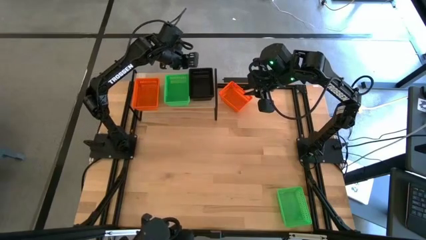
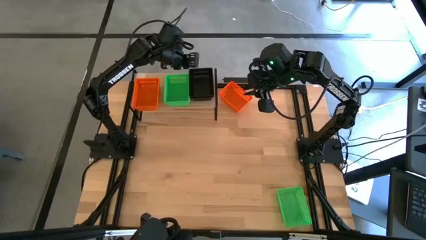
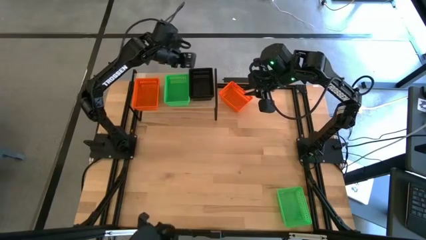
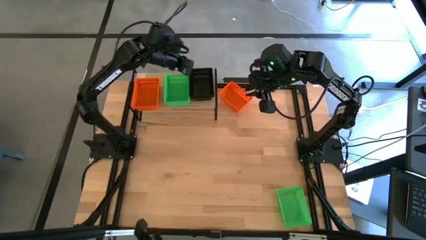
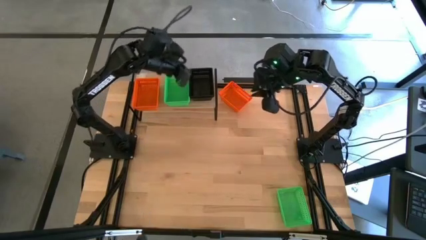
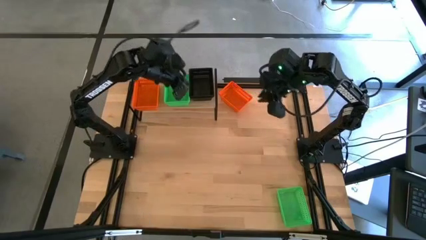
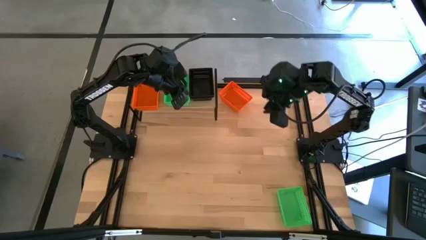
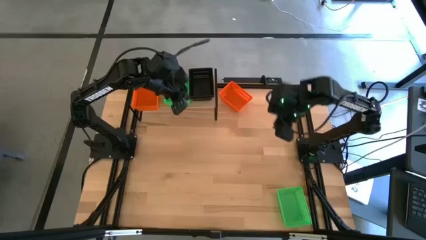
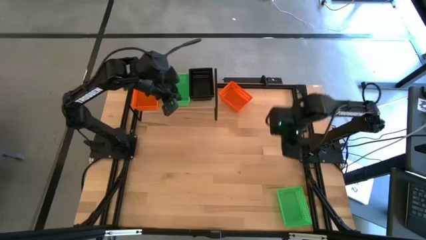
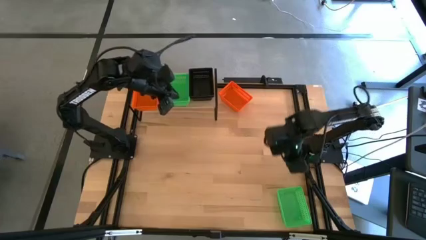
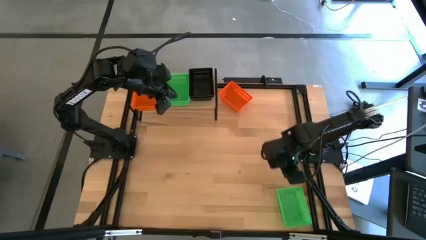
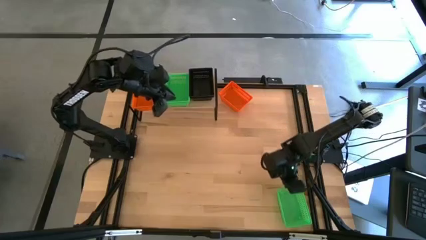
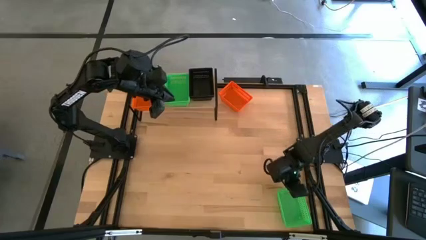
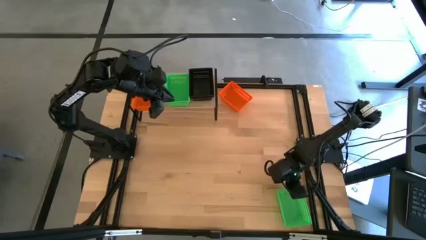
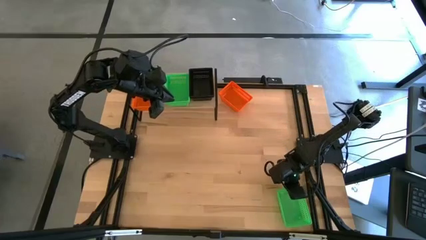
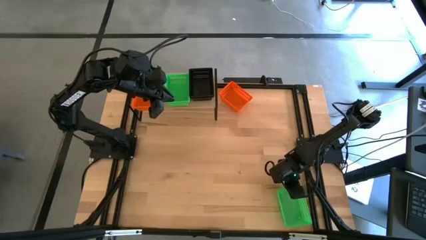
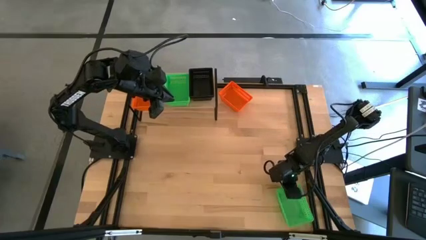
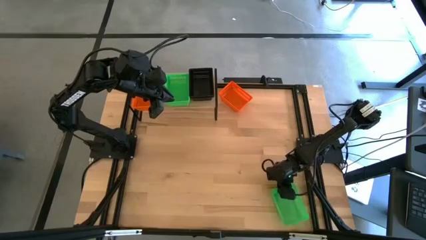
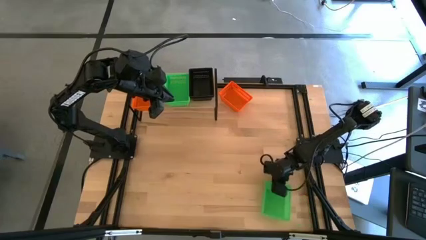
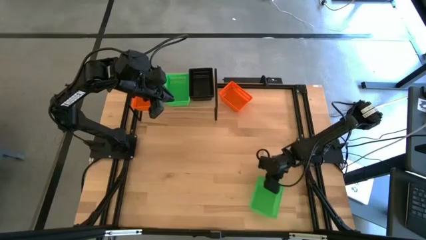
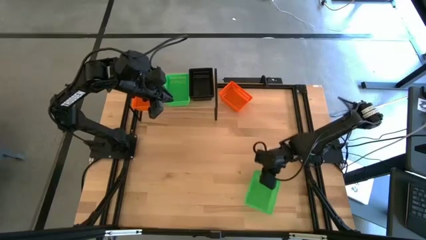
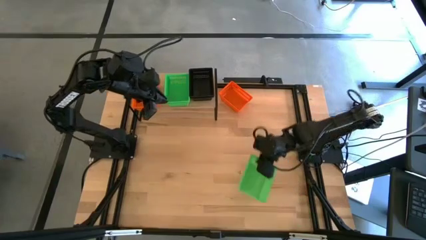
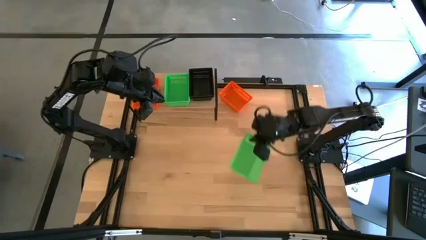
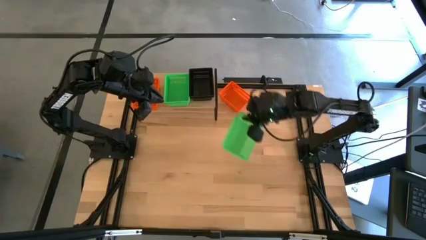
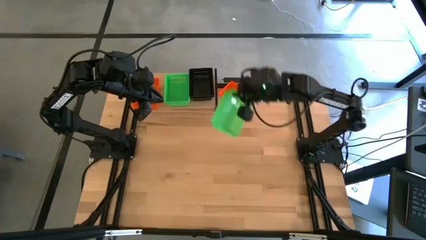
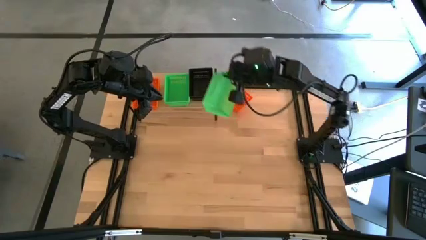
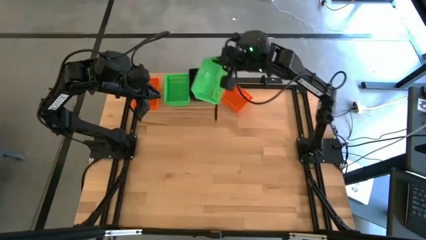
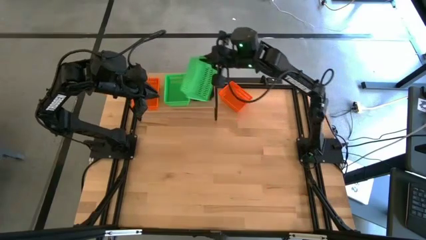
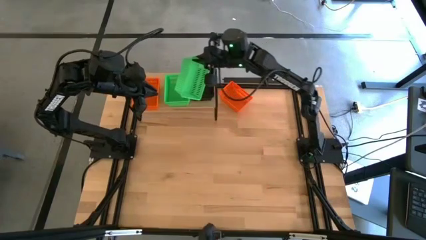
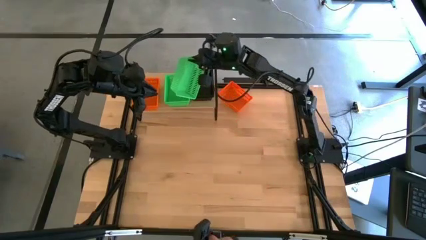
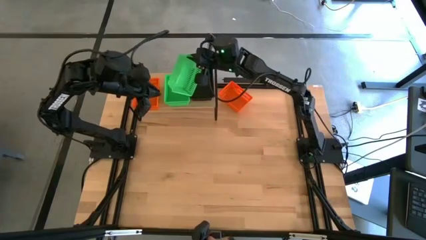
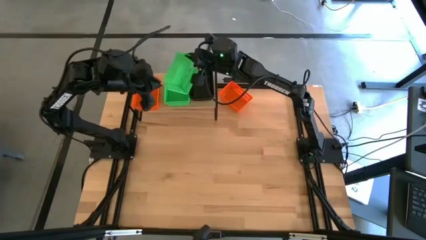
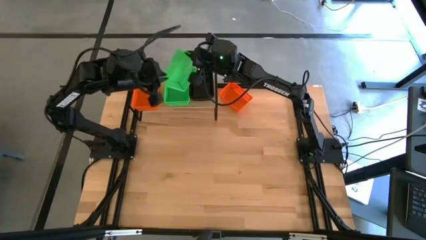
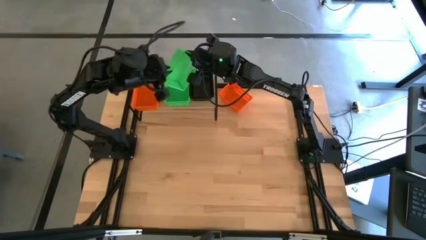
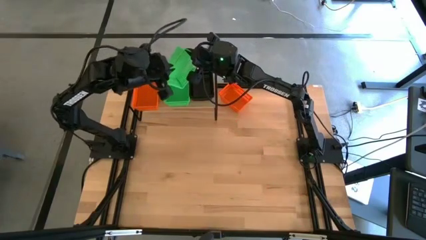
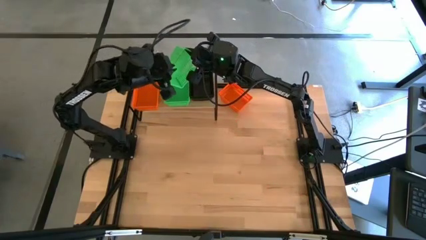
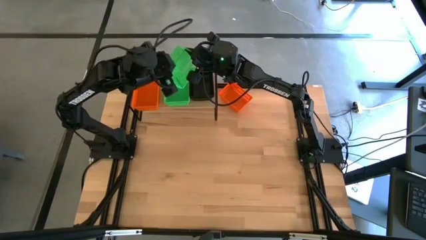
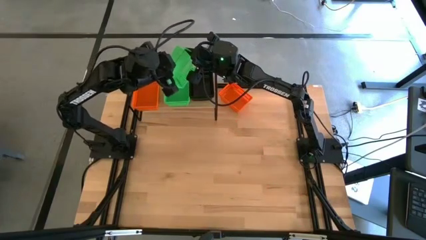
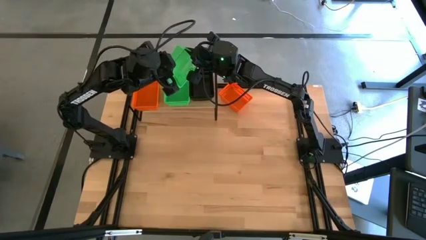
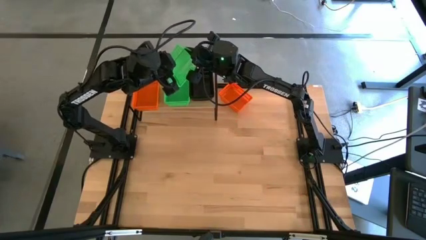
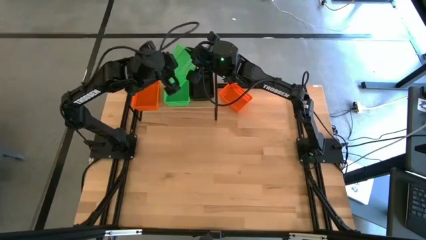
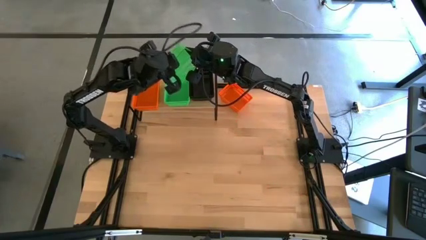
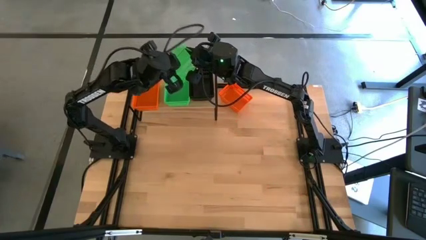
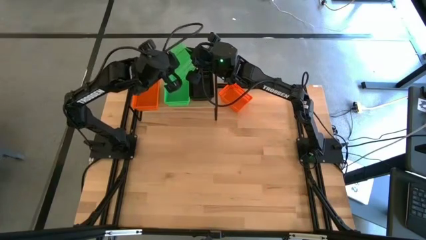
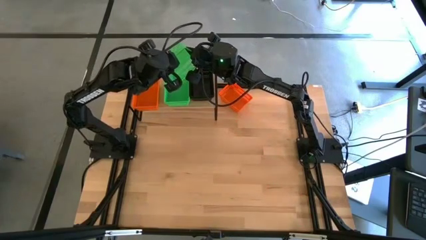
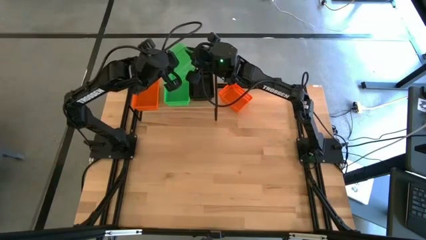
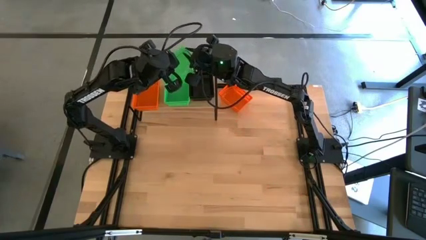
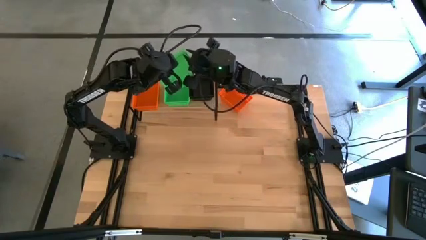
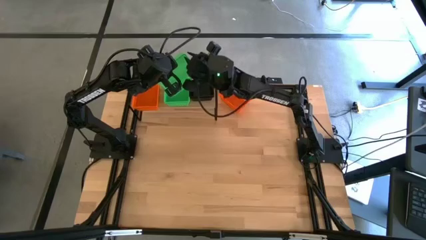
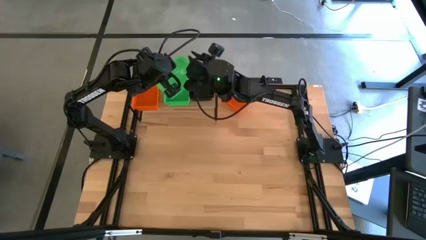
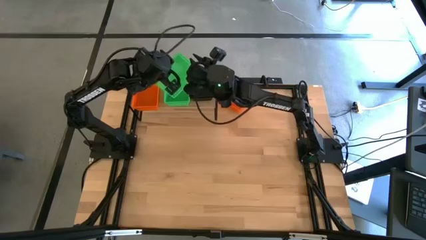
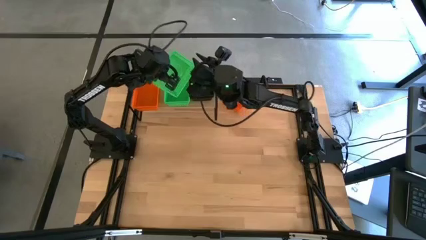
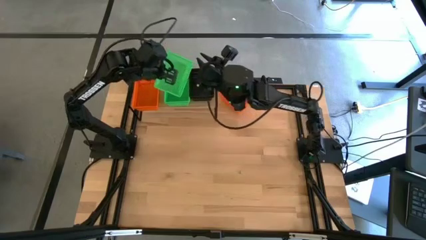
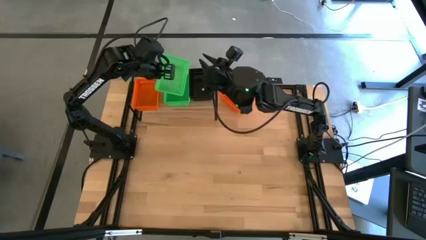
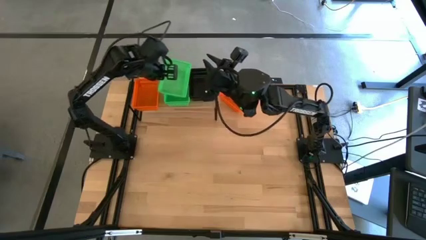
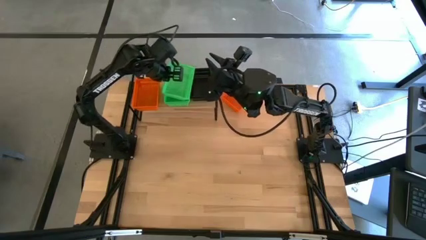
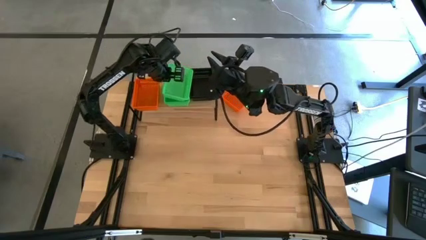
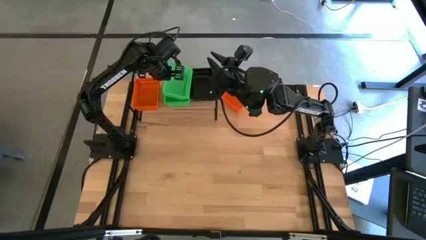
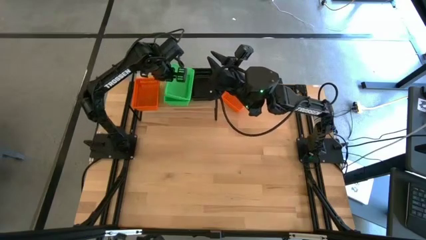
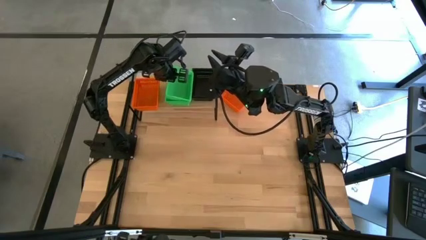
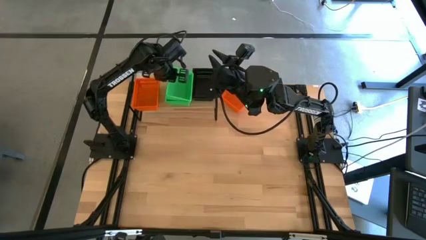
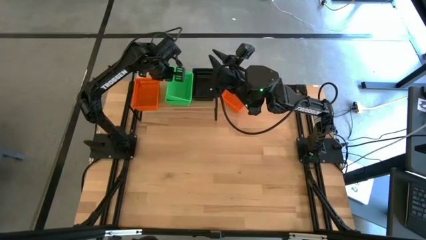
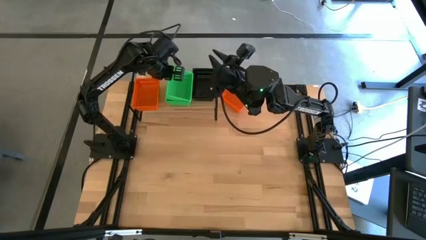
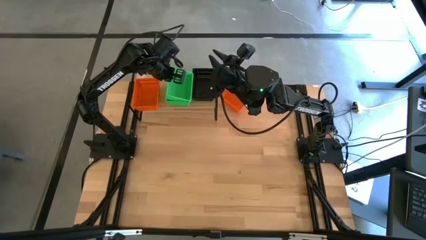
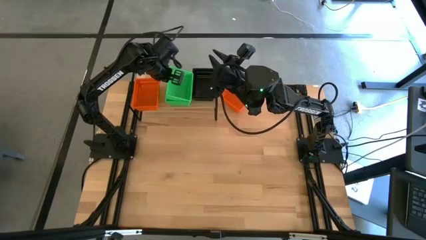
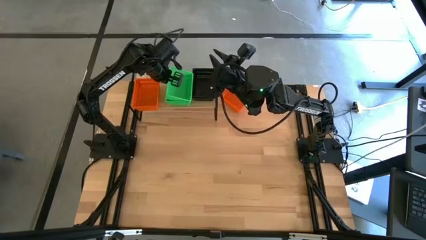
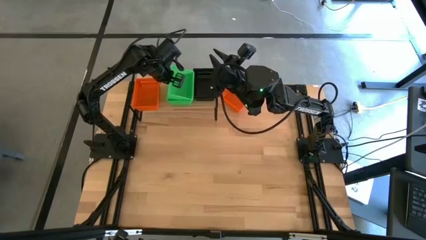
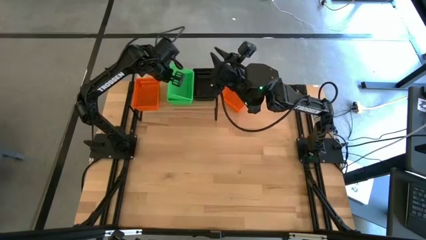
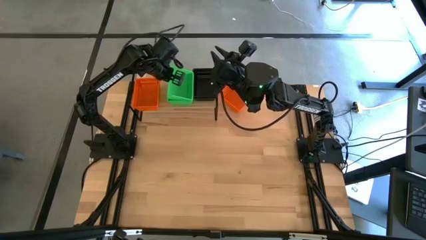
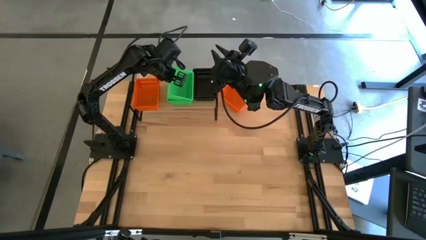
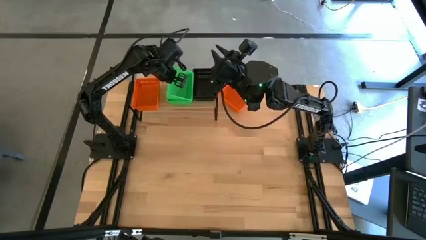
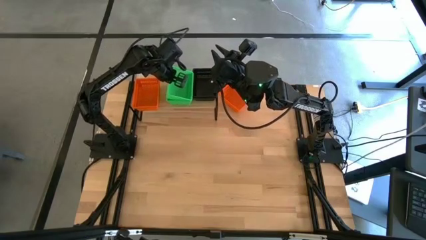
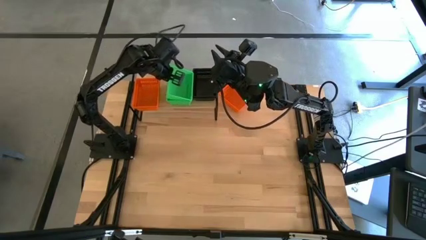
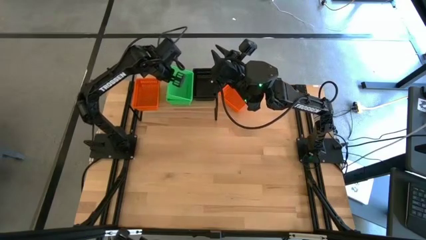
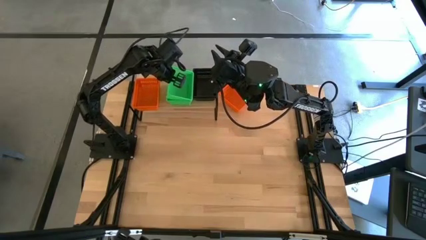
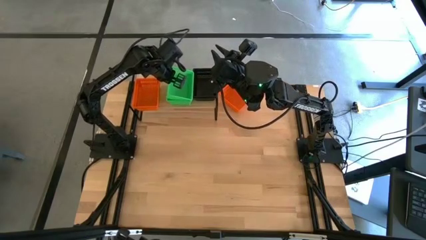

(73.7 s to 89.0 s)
Task: Stack baskets on shelf by color
Stack the green bin on the green bins on the shelf
